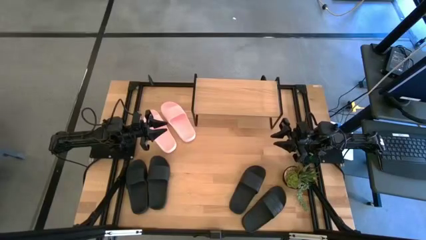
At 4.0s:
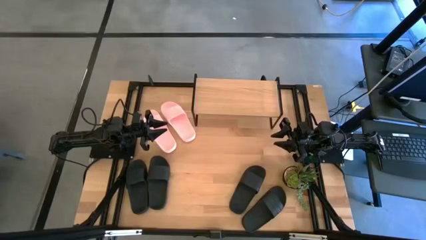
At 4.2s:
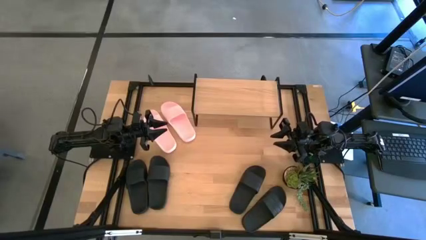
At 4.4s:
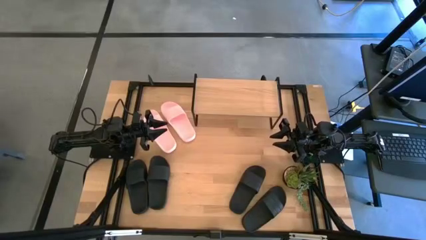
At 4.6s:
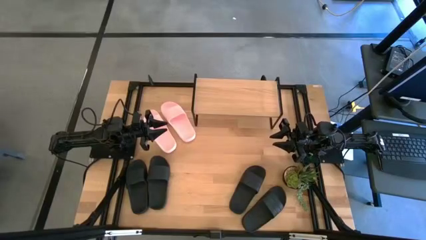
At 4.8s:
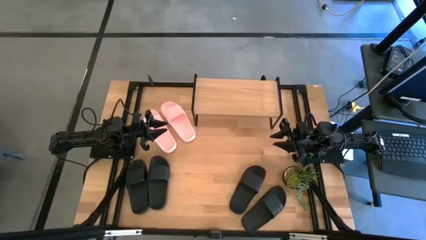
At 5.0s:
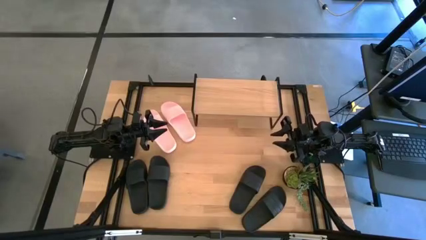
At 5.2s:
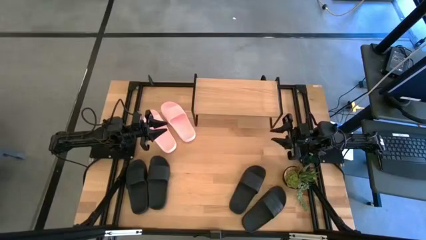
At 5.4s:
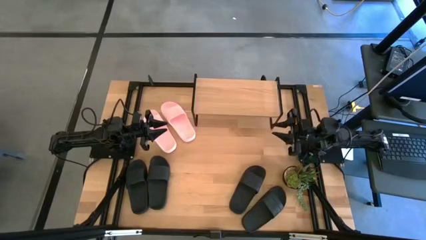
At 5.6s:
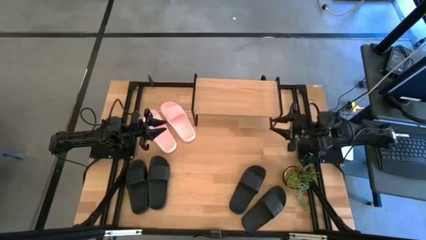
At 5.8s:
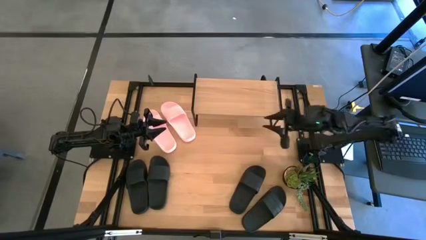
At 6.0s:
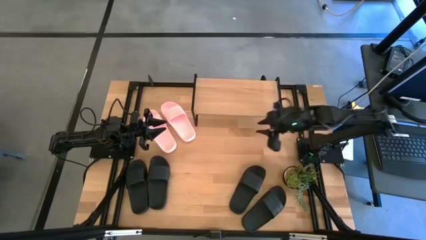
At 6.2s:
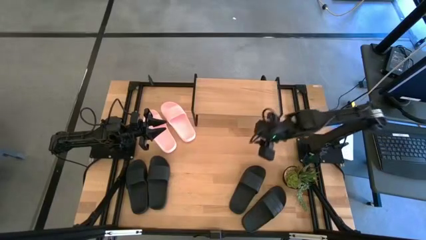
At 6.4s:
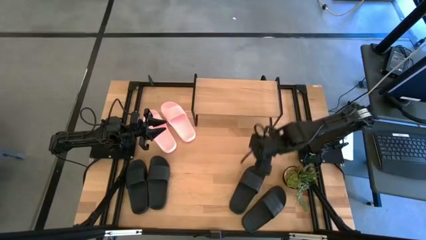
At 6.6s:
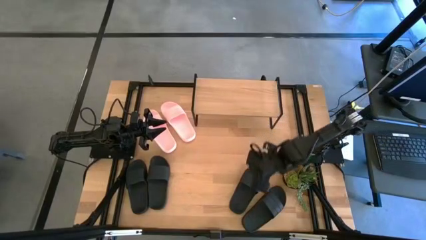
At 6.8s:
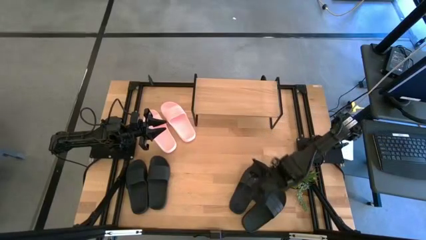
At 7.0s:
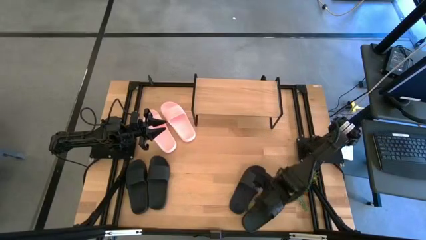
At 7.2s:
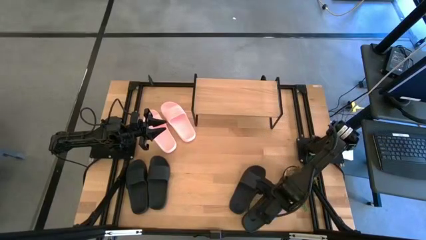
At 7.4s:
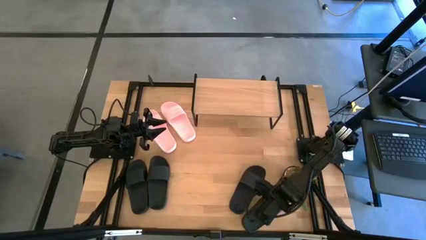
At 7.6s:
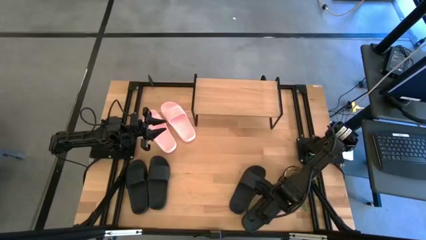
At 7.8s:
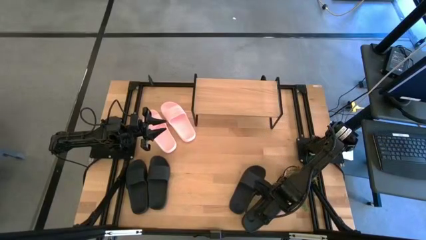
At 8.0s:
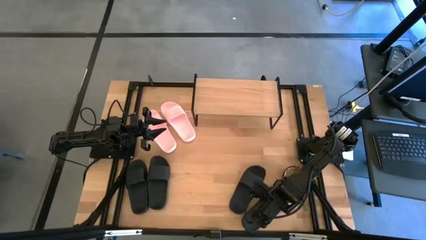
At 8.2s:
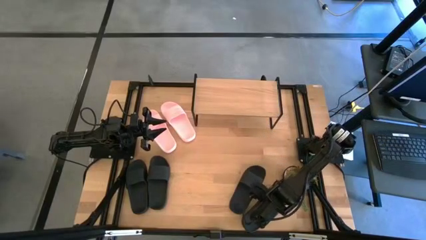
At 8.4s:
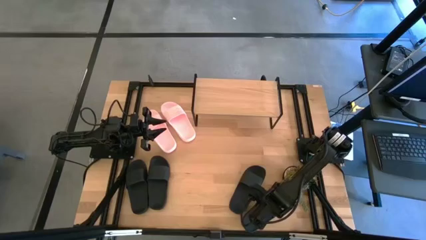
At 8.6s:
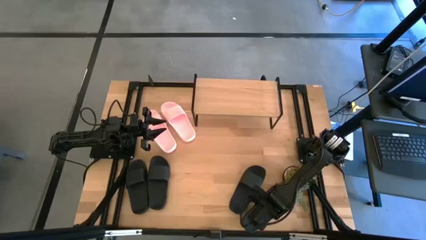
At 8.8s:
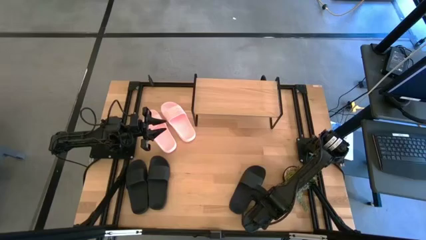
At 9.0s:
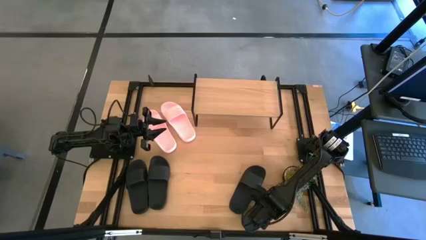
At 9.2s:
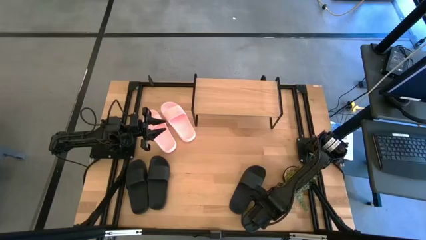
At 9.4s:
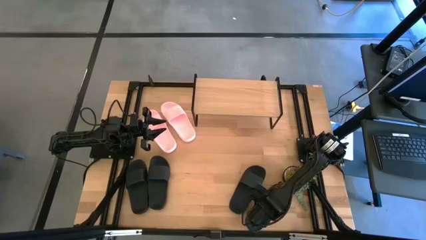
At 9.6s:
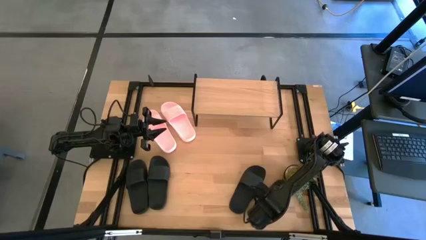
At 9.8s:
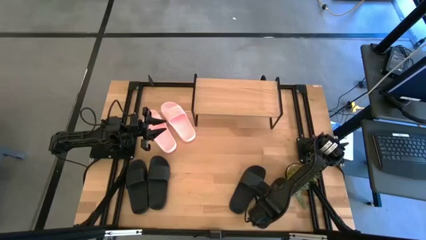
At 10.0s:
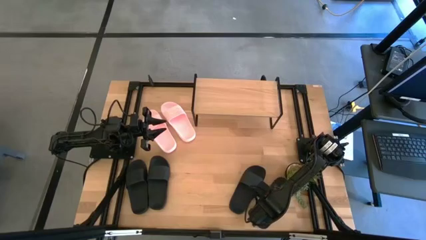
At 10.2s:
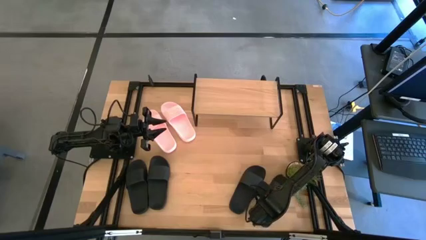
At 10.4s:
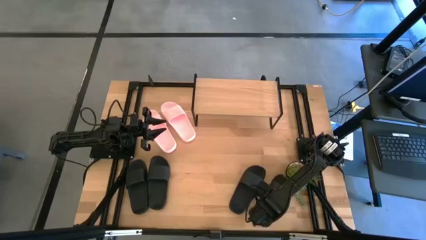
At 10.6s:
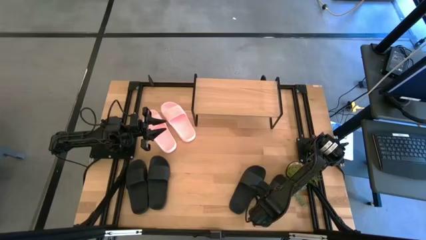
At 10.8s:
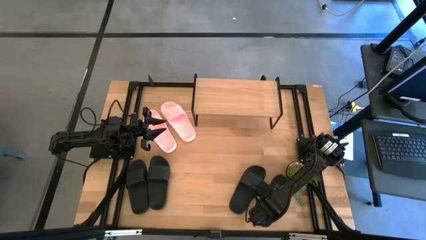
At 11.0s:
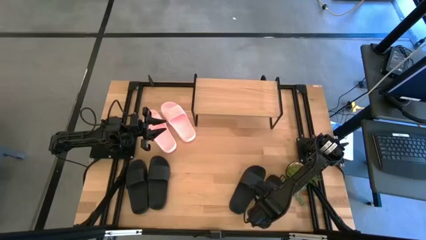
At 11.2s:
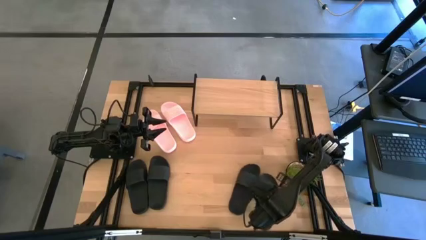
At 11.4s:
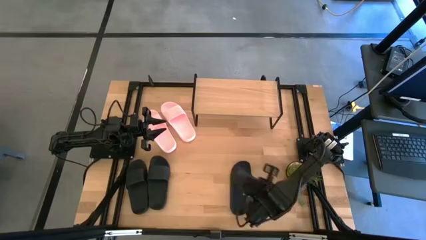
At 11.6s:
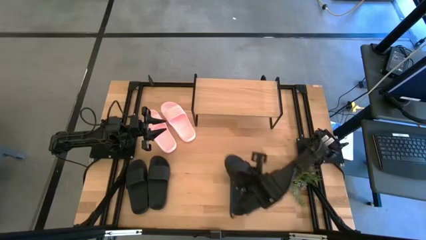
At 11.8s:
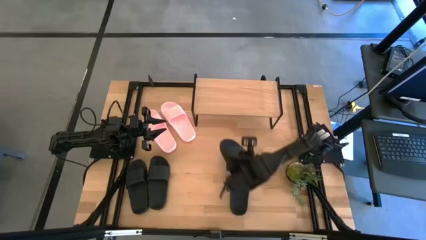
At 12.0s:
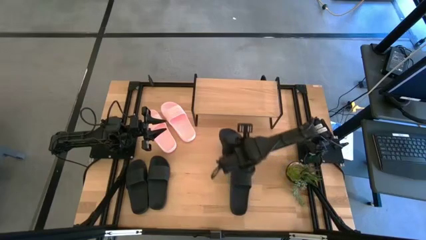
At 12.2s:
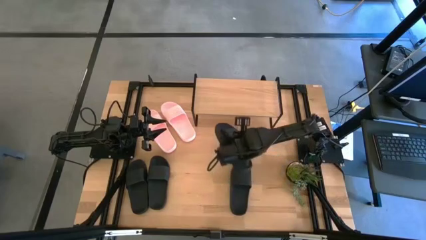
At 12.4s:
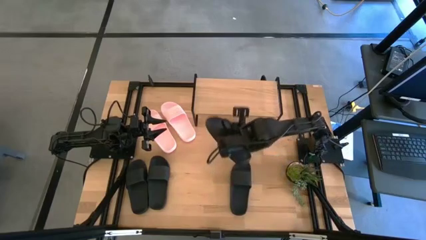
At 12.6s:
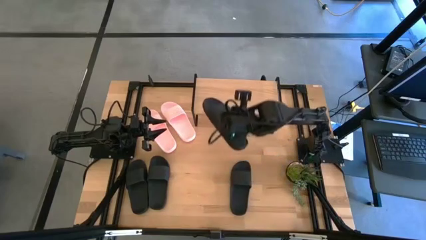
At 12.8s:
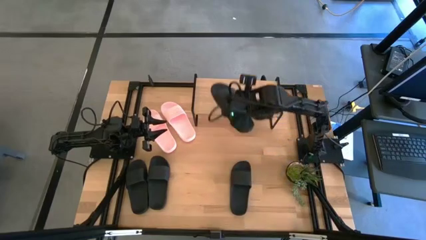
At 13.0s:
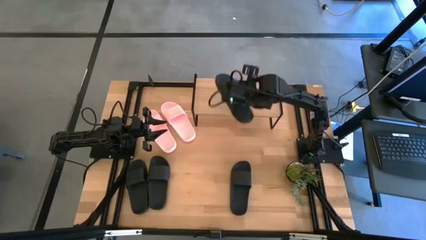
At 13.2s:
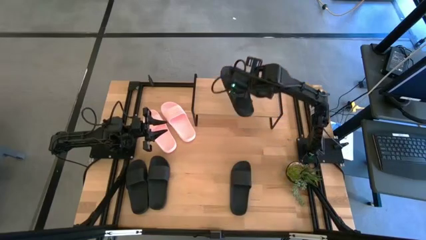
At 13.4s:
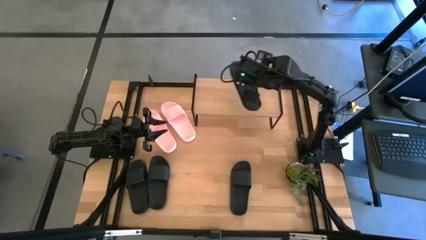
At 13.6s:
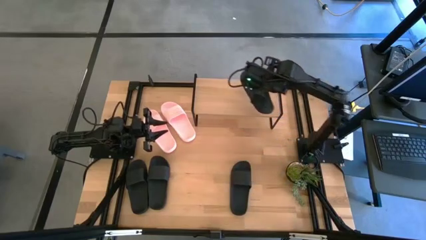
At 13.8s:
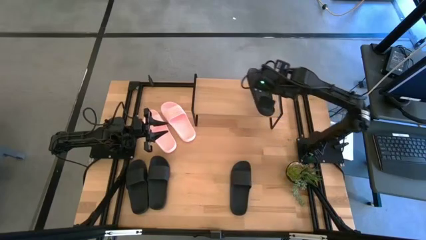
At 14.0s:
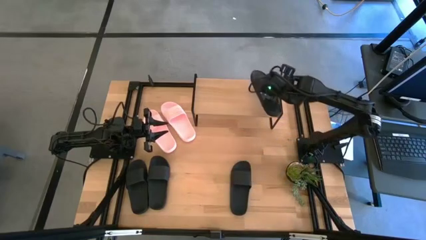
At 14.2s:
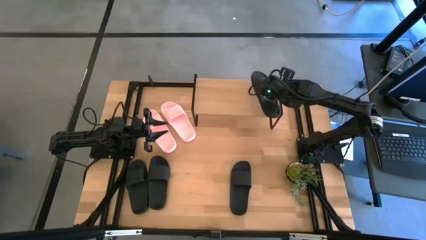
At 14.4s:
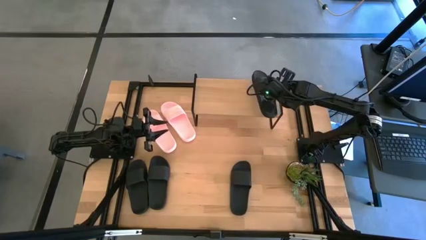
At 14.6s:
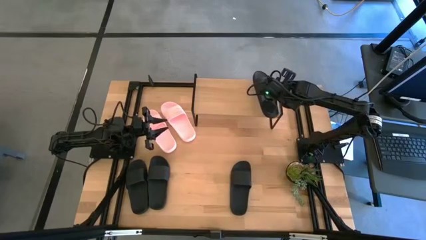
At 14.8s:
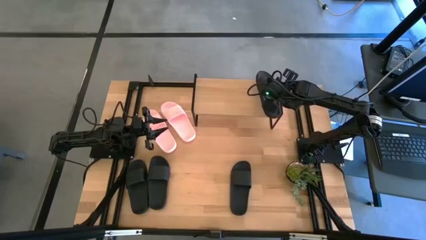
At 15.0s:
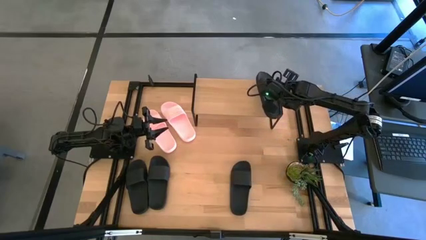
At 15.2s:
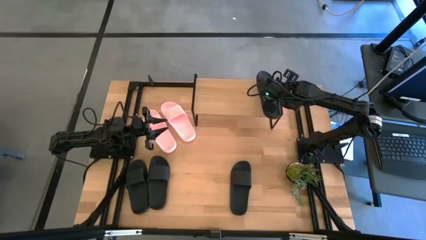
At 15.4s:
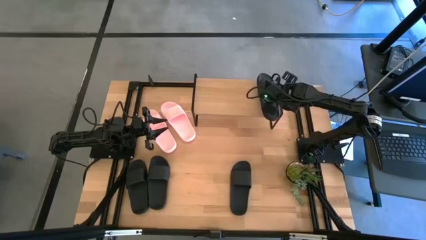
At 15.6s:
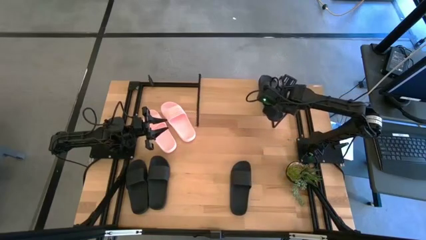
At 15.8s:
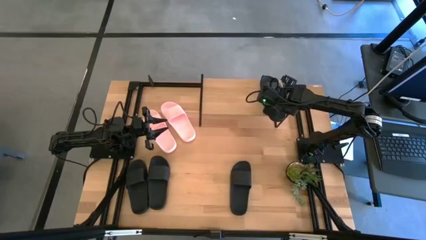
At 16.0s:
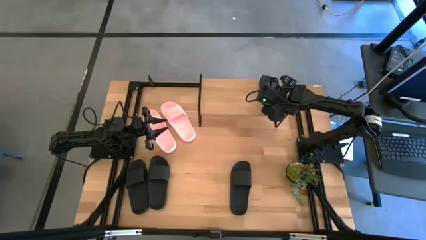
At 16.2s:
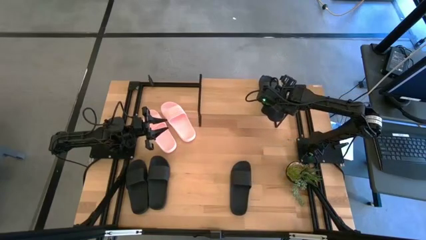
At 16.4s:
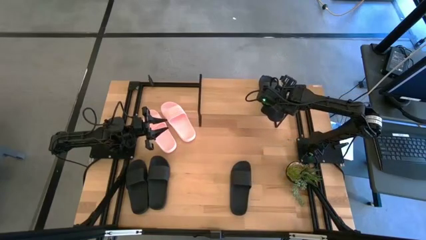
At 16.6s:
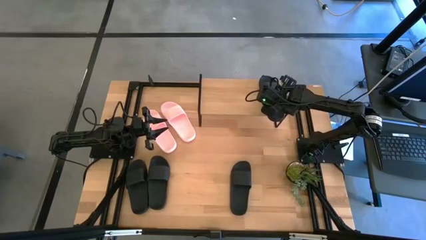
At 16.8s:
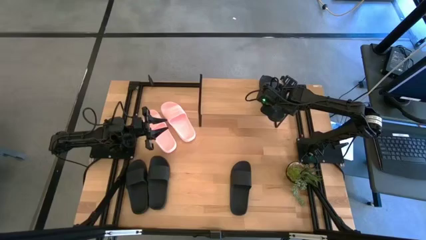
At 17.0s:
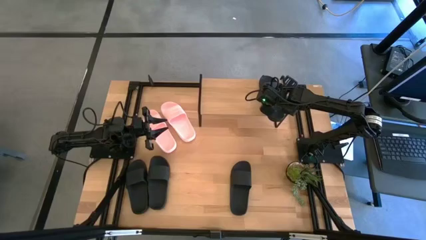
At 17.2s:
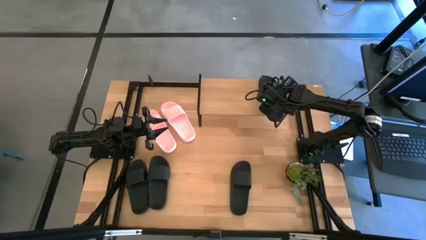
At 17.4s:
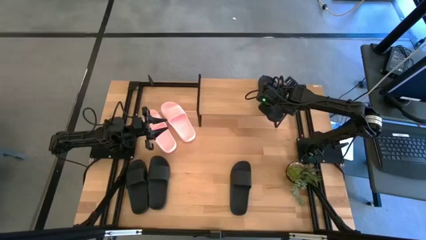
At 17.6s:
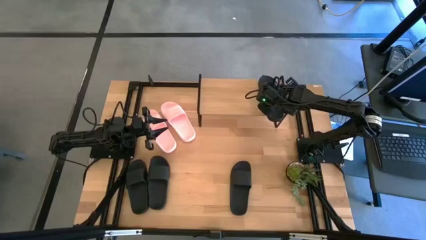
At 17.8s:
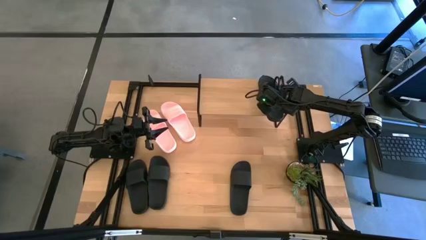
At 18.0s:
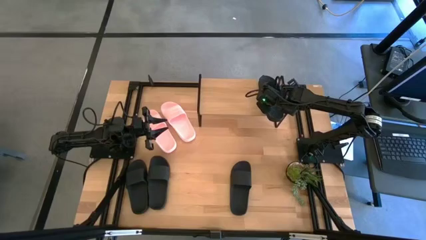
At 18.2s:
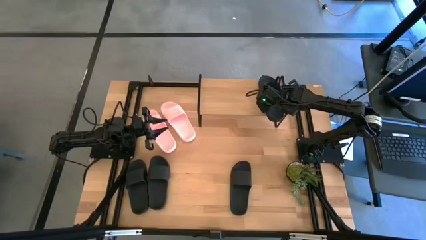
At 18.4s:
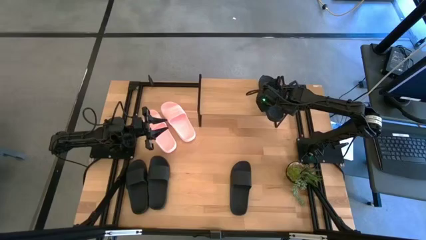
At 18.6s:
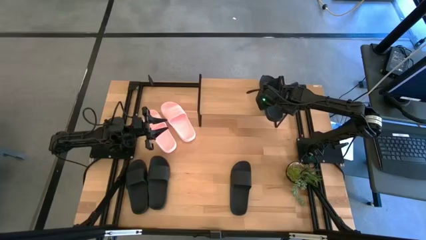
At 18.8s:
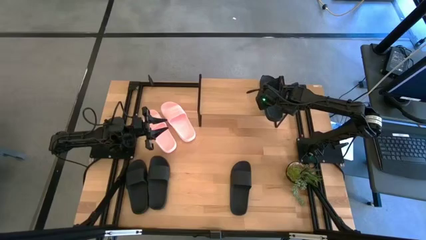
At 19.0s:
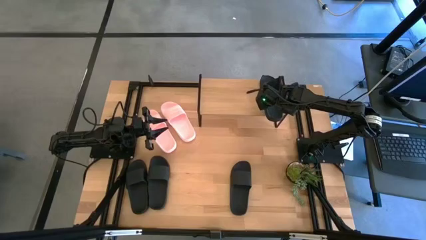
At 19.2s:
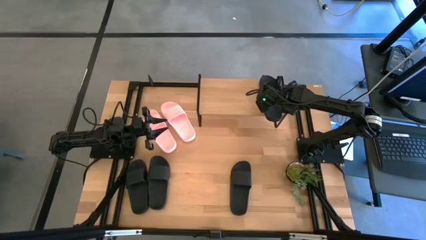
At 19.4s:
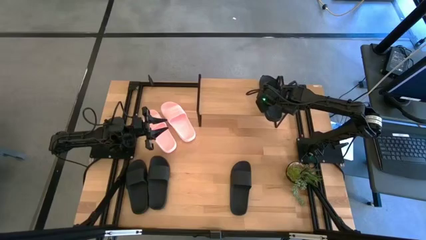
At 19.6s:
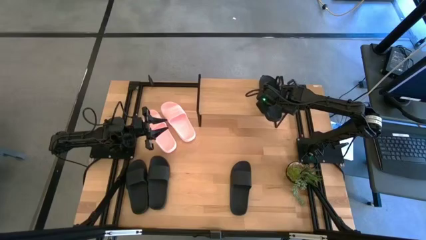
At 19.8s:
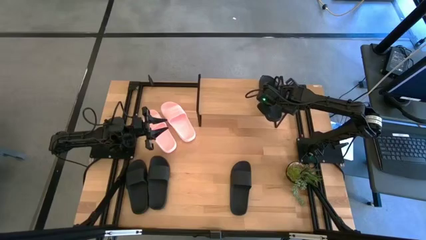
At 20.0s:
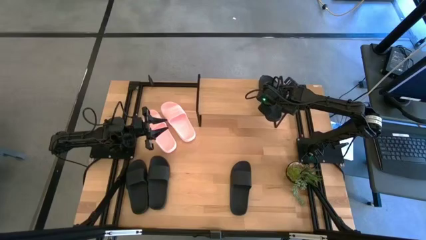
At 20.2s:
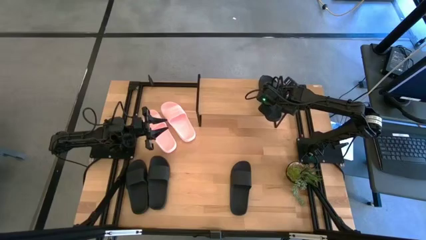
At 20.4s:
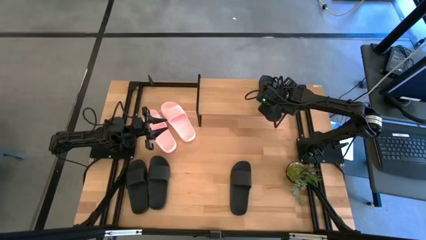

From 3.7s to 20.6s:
Task: Pick and place slides into the shelf
Put the black slide on the shelf
